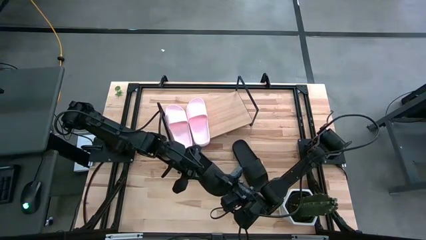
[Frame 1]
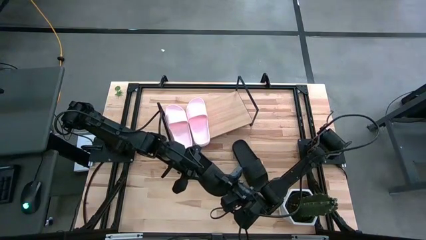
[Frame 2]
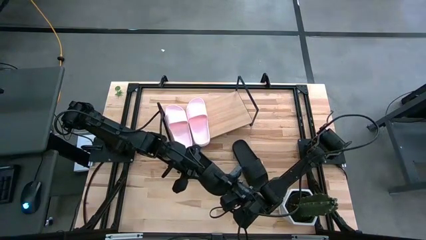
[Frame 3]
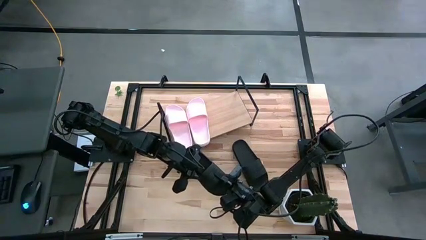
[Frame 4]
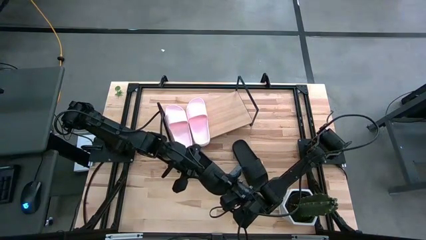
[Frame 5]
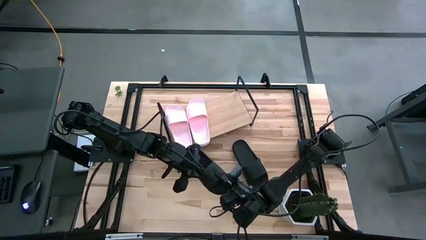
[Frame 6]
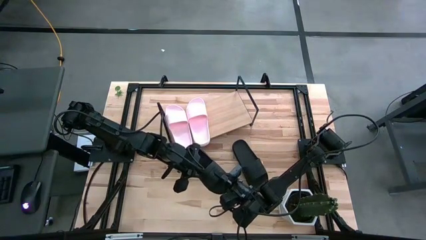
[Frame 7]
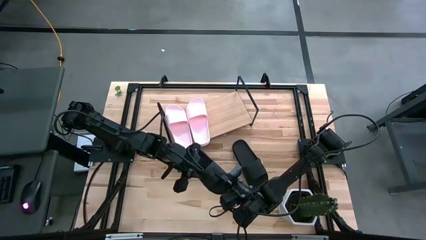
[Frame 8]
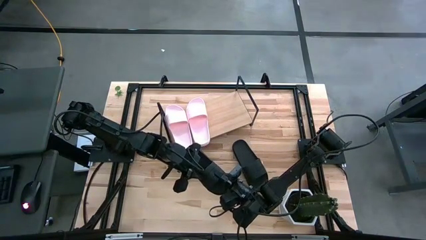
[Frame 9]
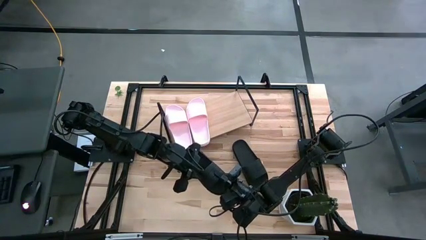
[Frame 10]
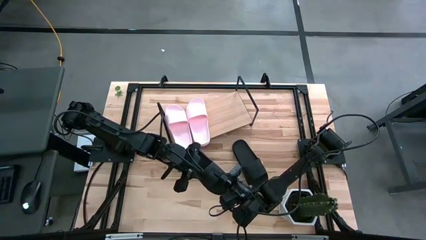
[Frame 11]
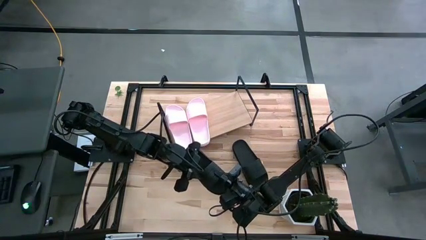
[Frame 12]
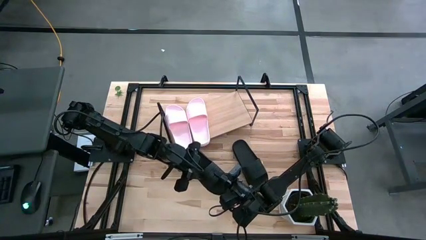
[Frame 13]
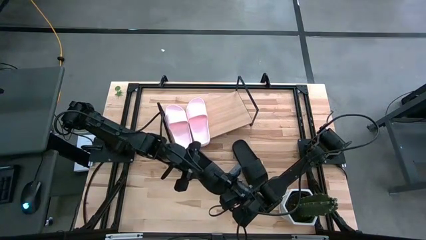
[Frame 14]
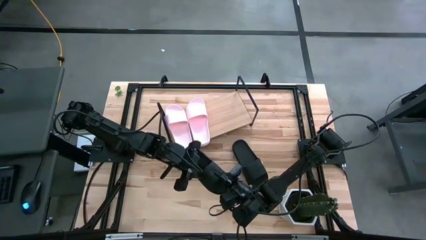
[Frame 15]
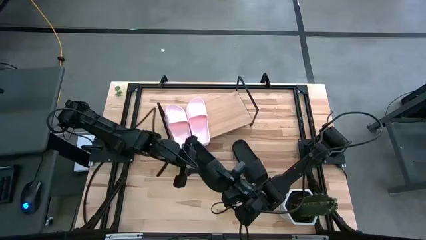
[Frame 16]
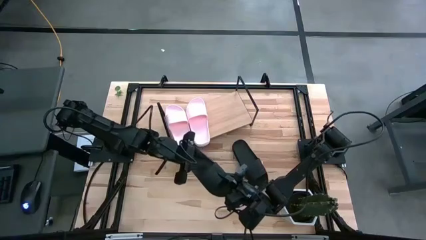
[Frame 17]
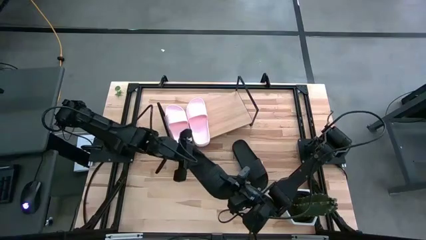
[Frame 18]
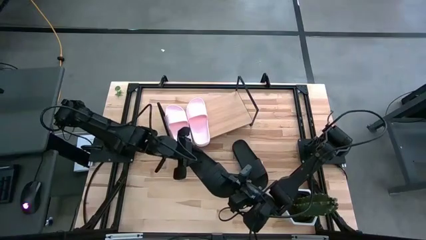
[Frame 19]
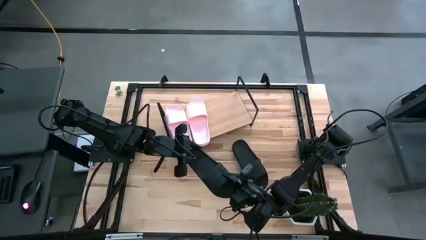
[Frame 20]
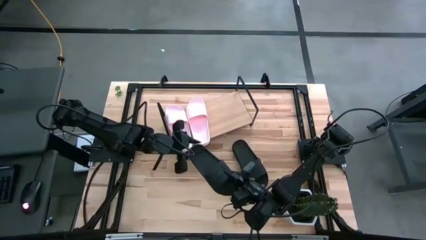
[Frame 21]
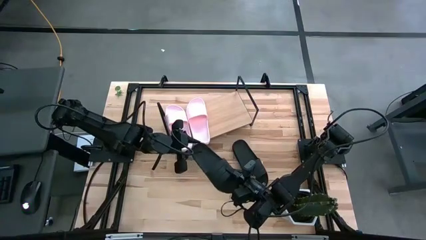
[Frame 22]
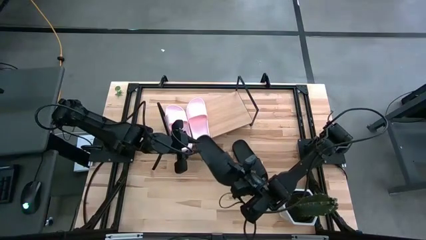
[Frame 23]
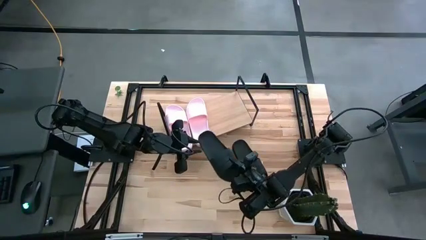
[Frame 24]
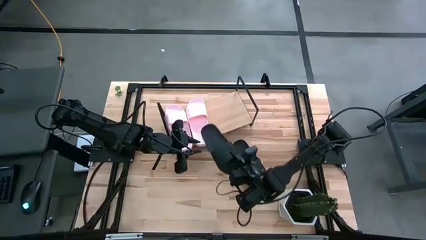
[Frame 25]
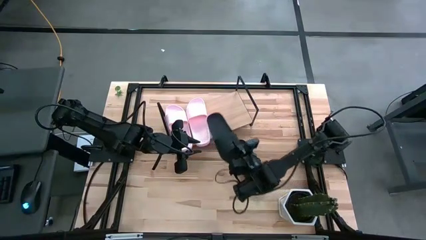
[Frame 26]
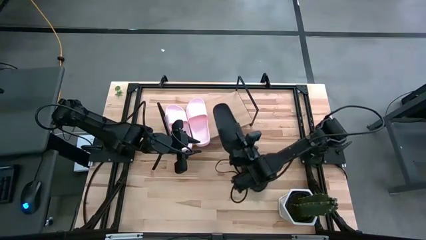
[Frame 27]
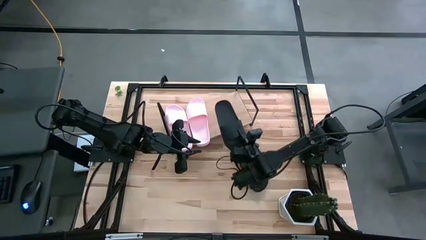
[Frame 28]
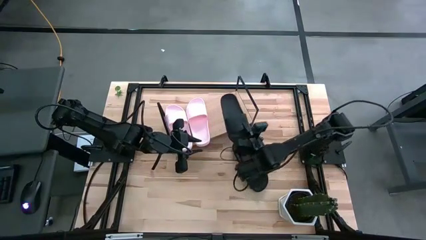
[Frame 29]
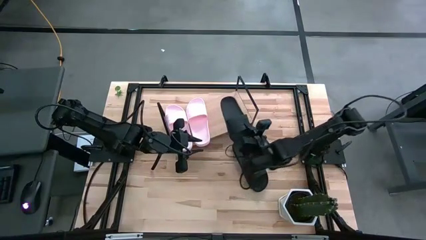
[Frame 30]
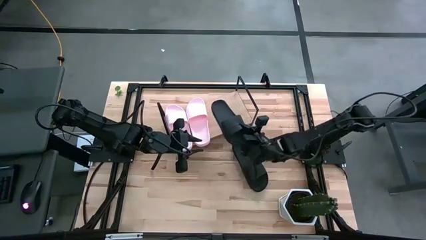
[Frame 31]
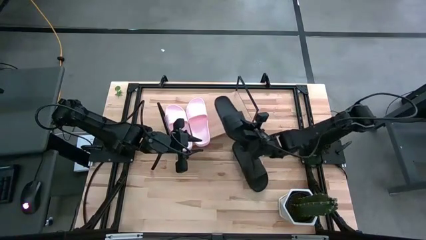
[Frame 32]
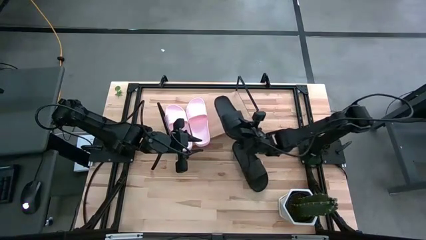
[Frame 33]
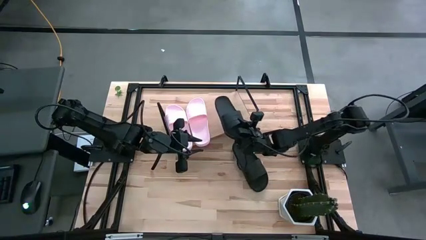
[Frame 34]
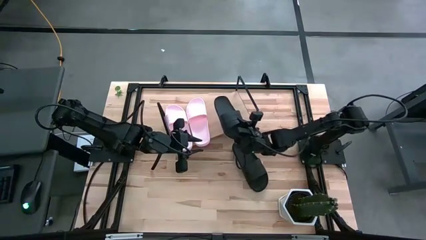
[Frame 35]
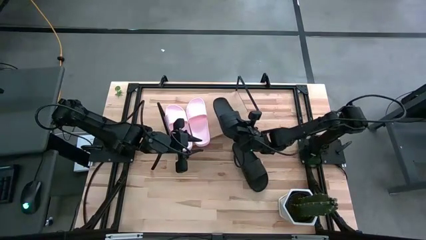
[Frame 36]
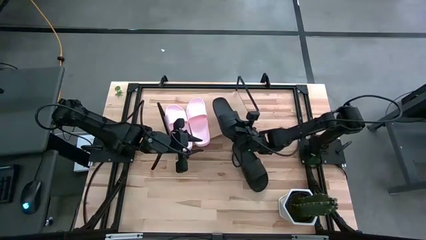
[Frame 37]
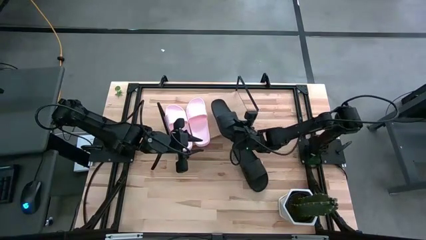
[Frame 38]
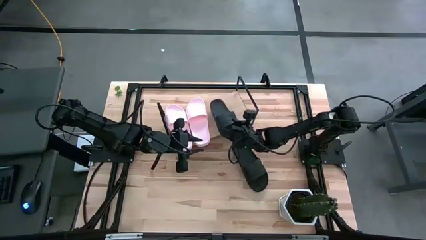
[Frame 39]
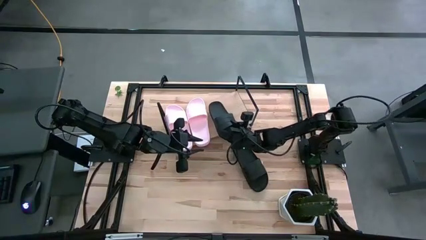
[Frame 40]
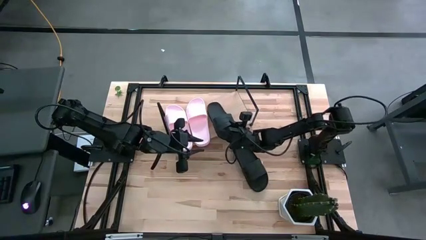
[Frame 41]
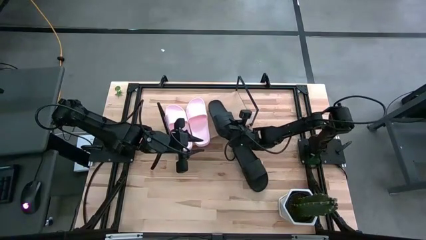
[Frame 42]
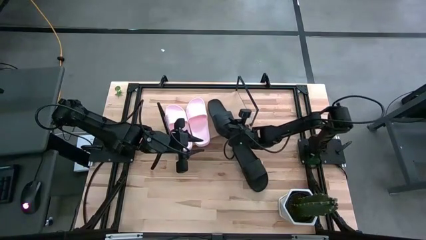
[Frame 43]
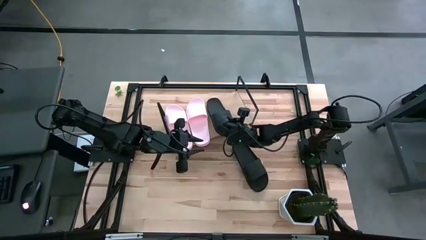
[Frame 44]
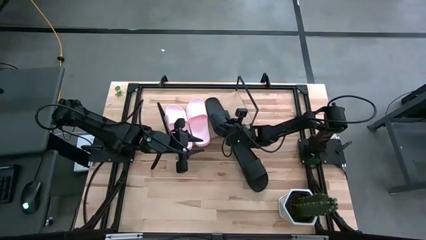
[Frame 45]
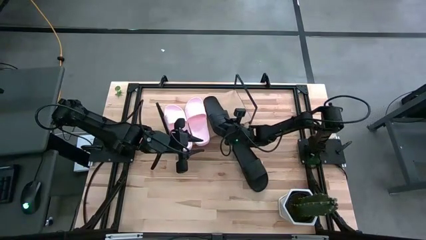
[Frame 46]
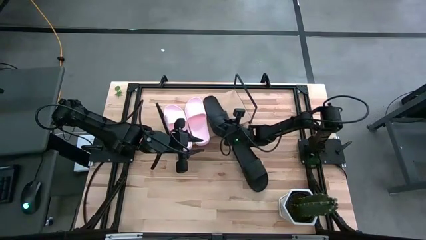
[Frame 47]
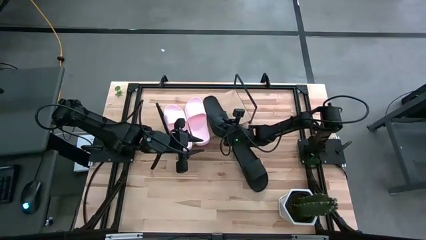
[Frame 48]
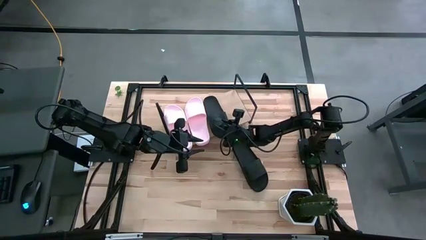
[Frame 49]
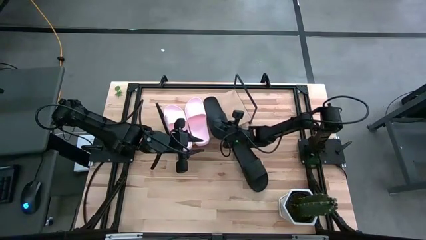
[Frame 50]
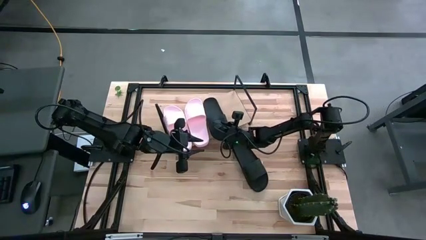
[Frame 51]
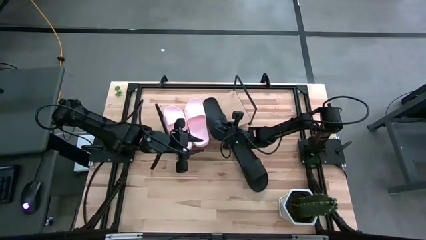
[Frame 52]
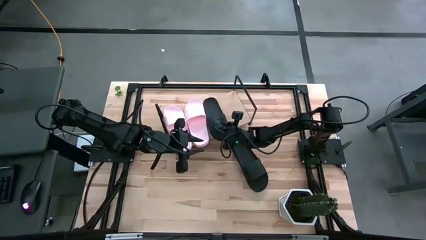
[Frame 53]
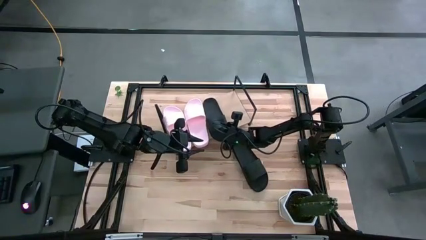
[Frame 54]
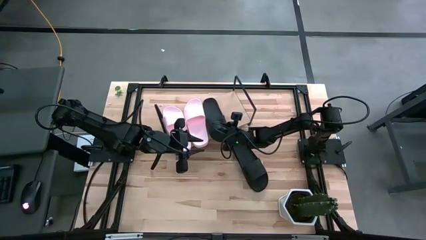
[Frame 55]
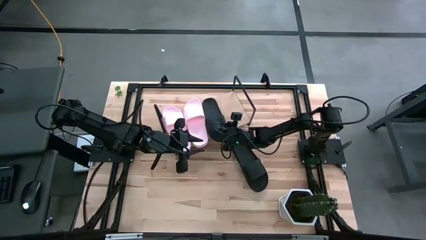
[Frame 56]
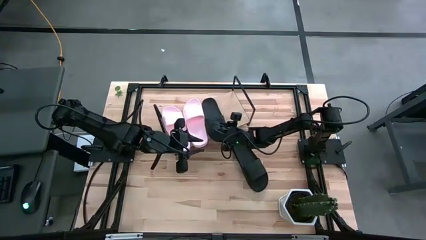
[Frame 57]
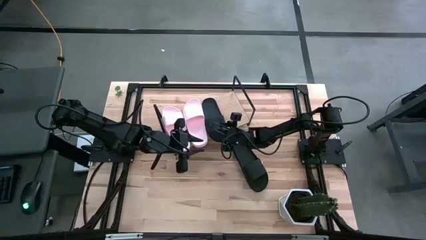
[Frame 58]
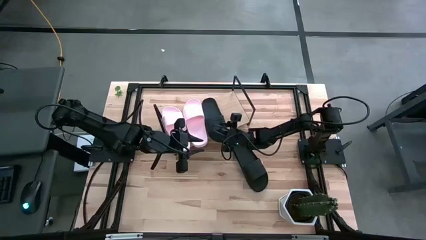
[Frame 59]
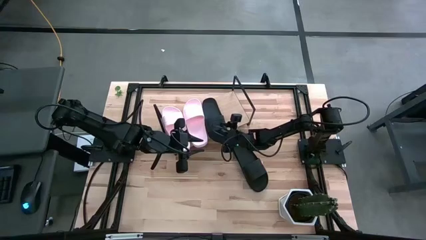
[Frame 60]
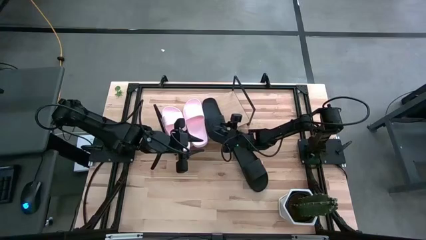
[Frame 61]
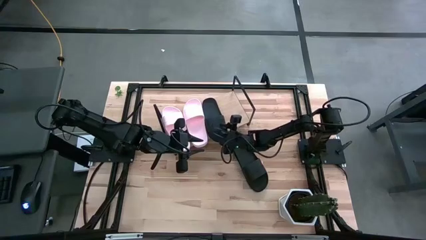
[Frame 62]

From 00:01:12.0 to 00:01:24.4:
Task: Pick and place slides into the shelf
Put the left black slide on the shelf
